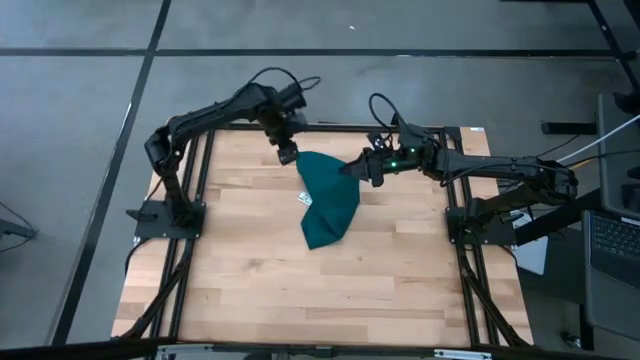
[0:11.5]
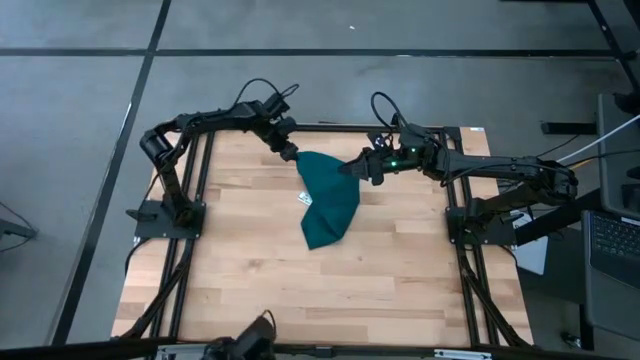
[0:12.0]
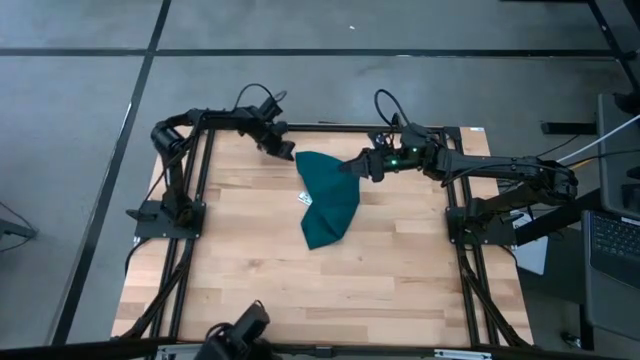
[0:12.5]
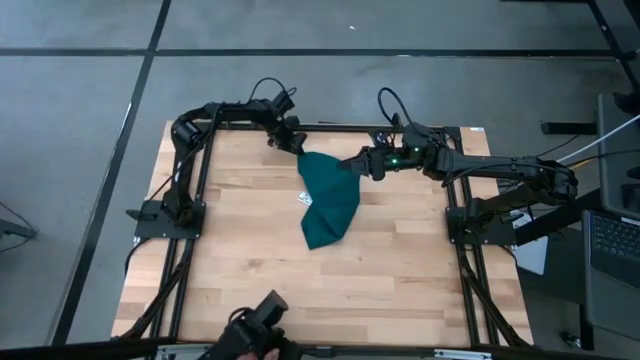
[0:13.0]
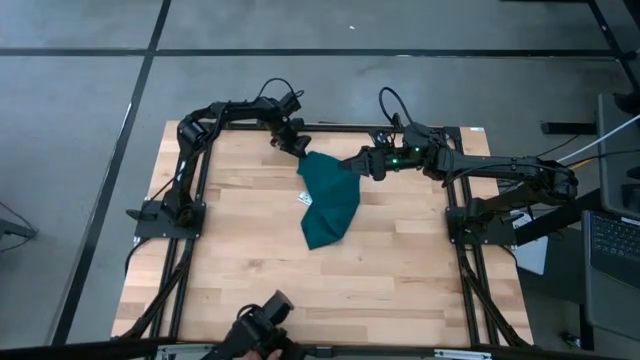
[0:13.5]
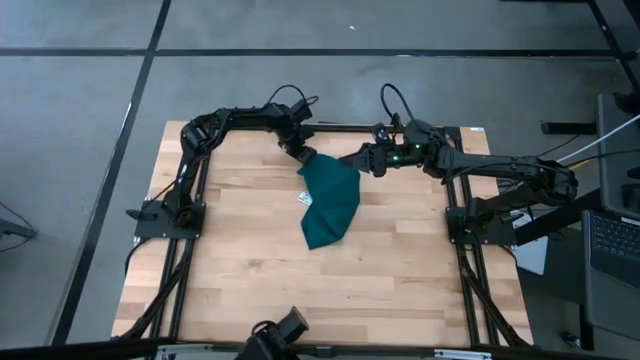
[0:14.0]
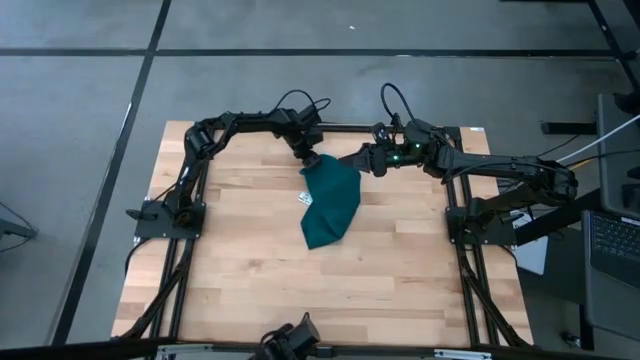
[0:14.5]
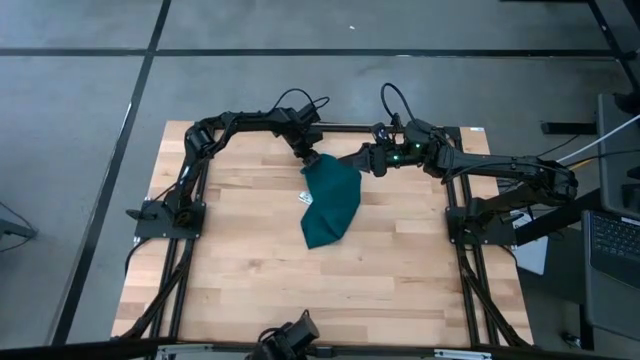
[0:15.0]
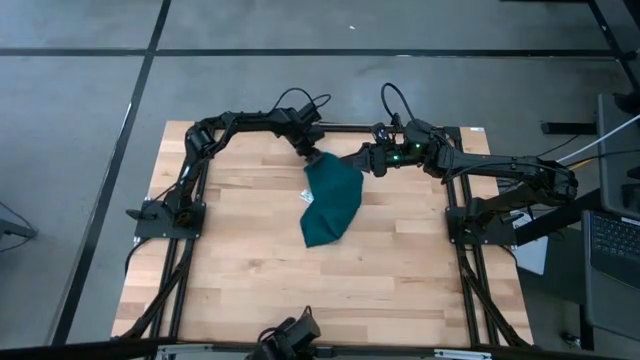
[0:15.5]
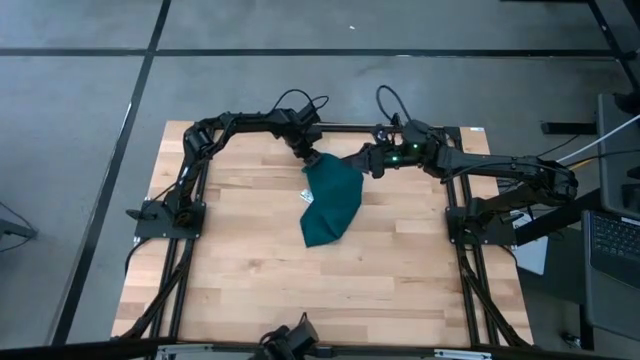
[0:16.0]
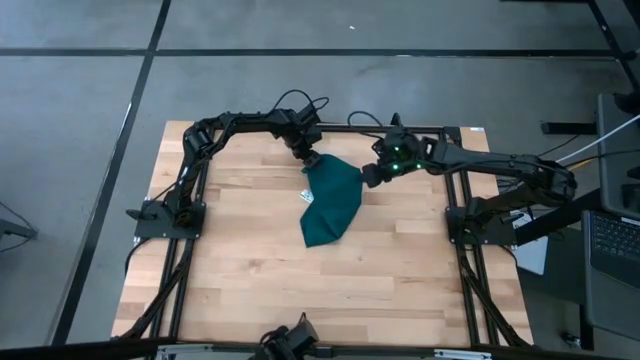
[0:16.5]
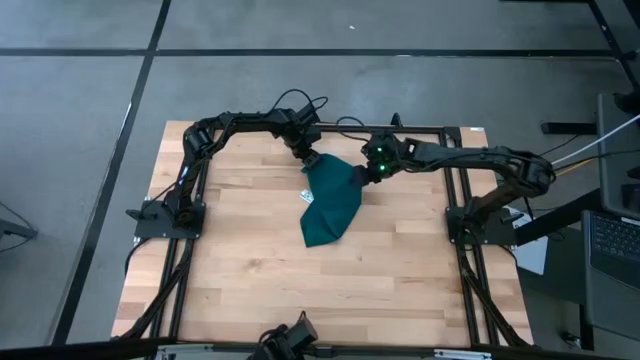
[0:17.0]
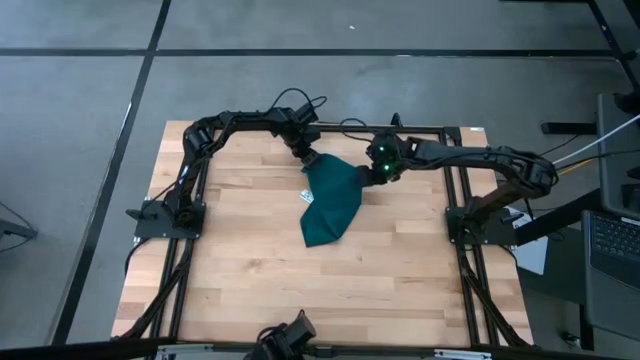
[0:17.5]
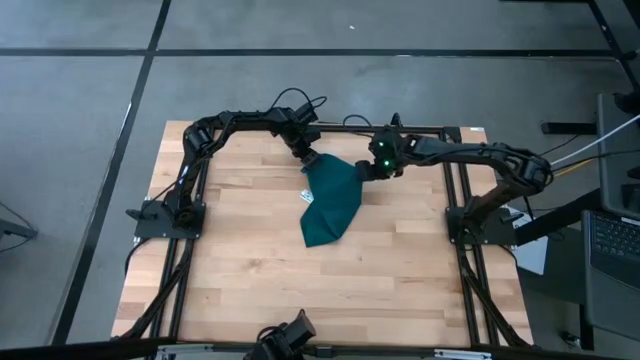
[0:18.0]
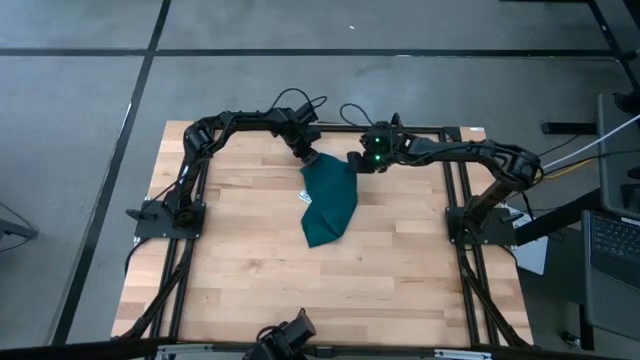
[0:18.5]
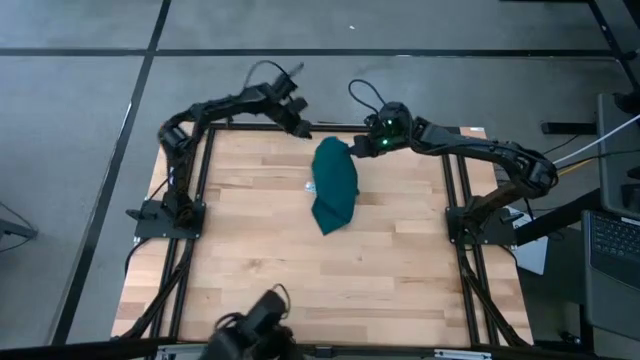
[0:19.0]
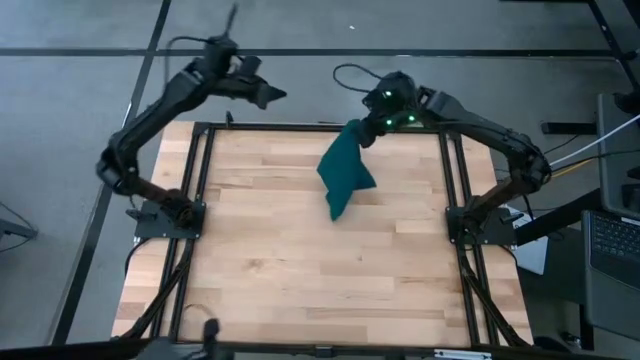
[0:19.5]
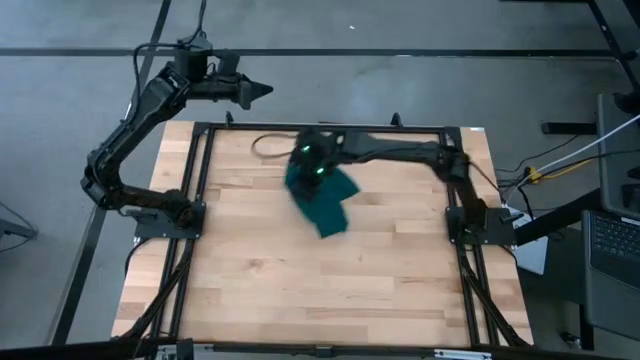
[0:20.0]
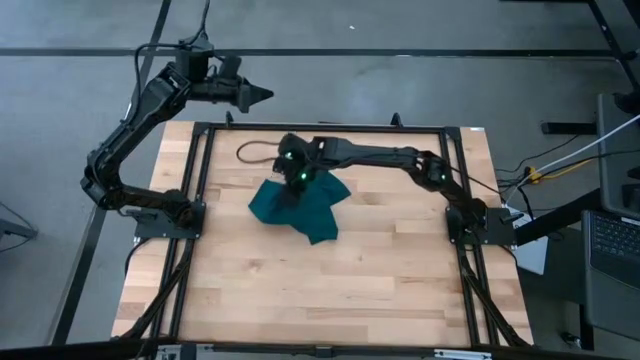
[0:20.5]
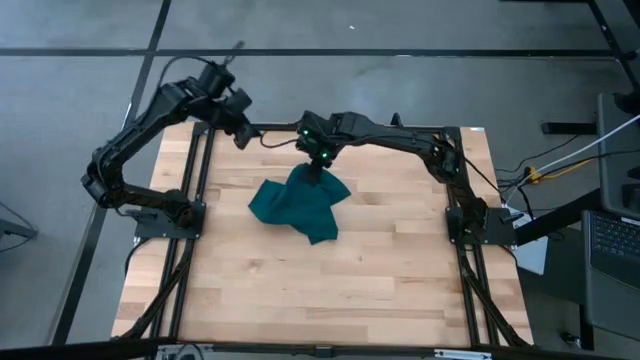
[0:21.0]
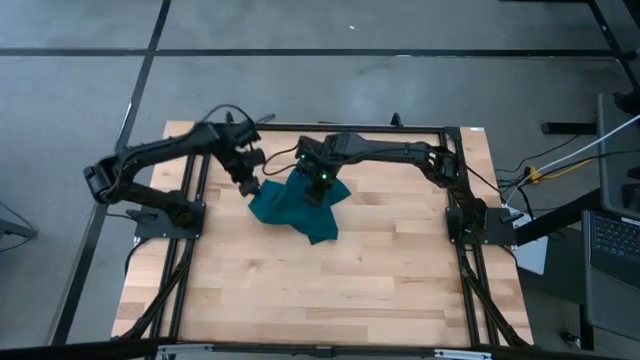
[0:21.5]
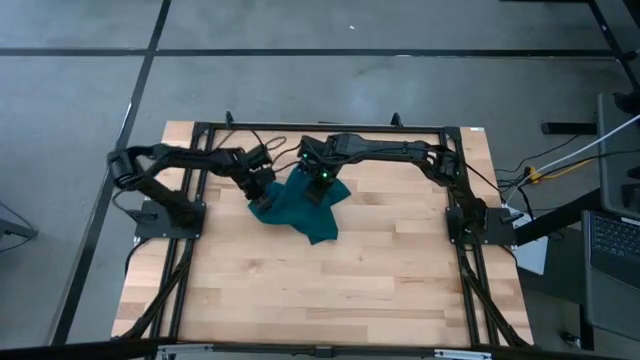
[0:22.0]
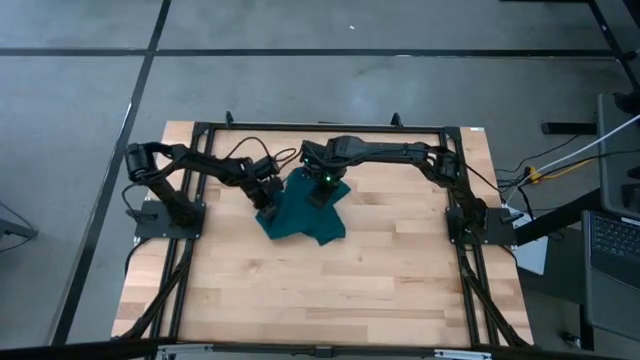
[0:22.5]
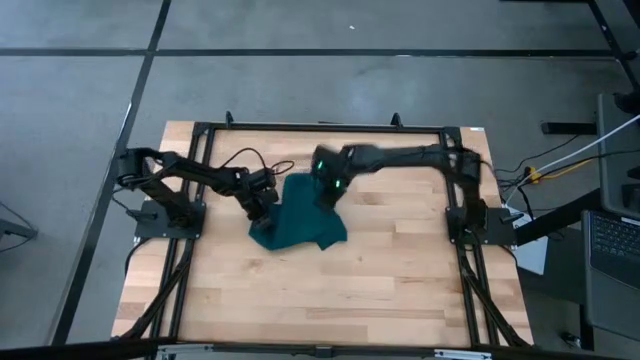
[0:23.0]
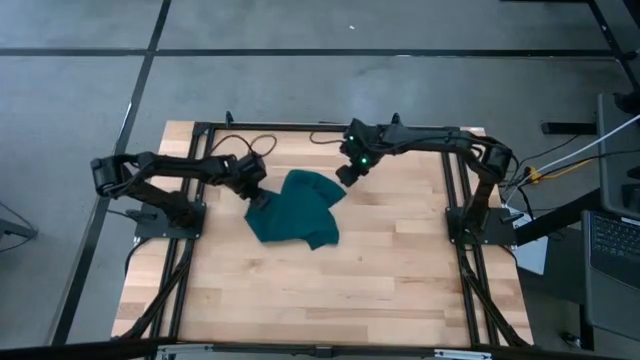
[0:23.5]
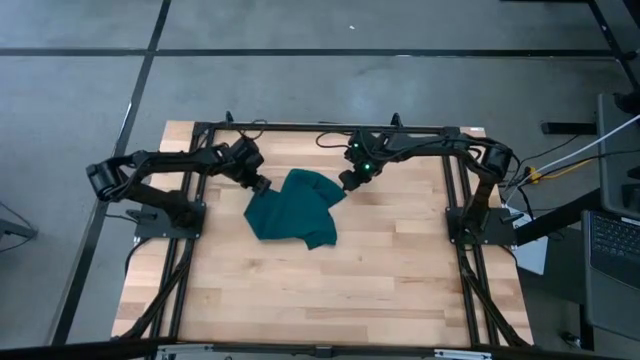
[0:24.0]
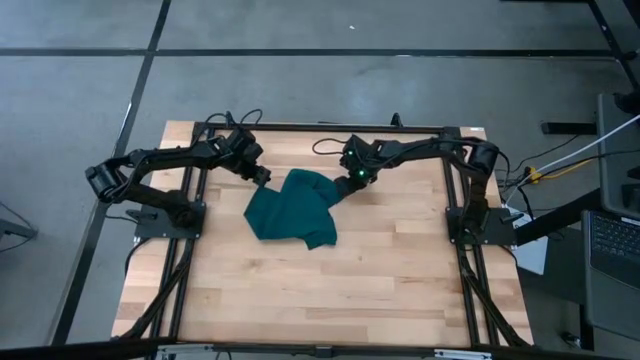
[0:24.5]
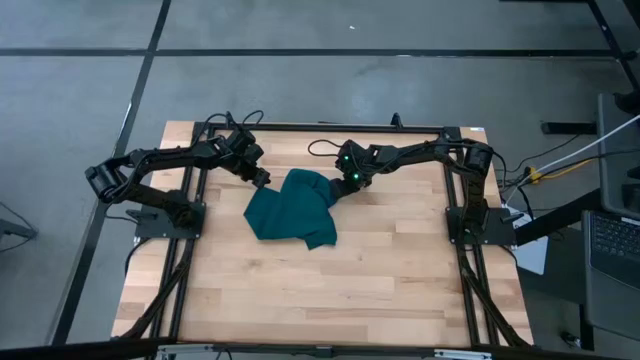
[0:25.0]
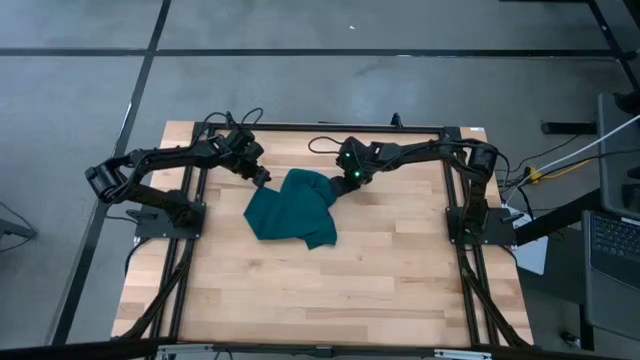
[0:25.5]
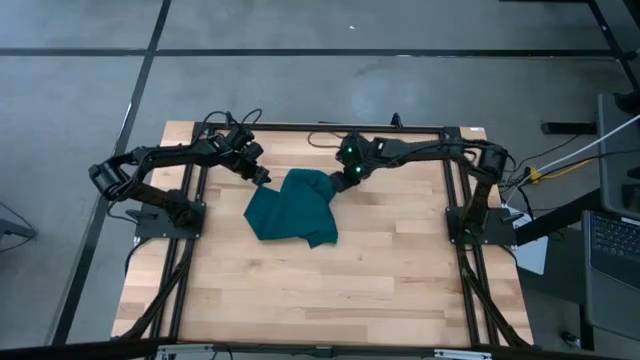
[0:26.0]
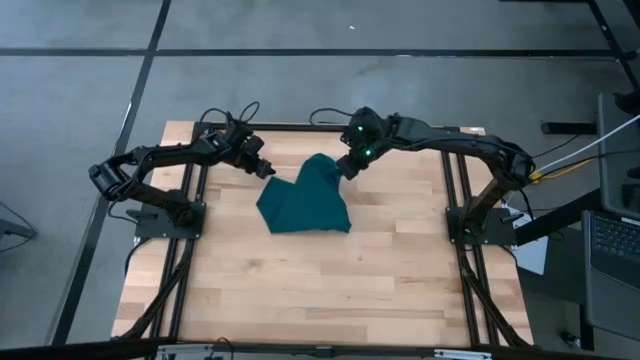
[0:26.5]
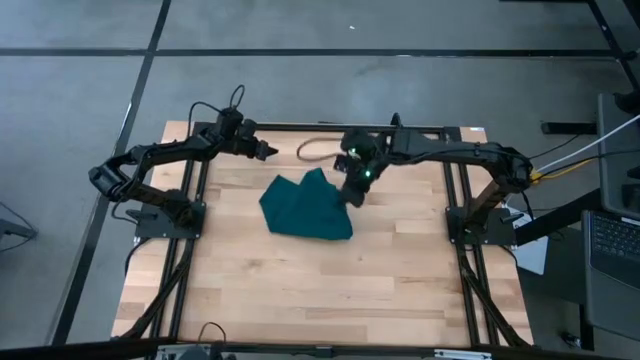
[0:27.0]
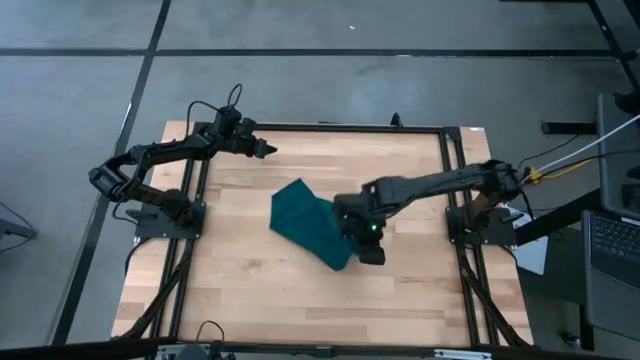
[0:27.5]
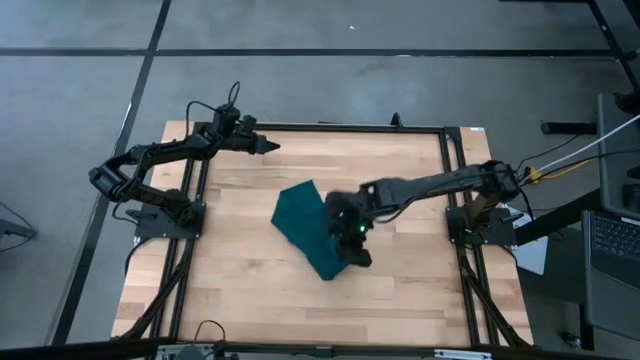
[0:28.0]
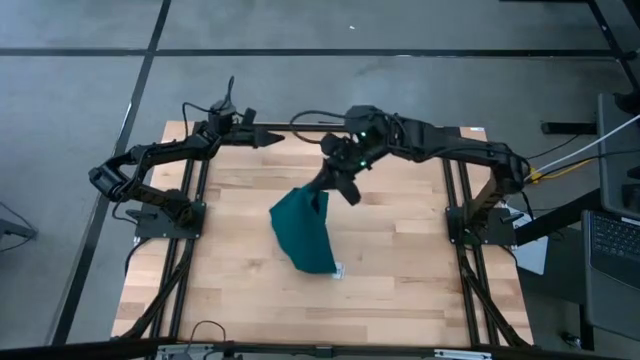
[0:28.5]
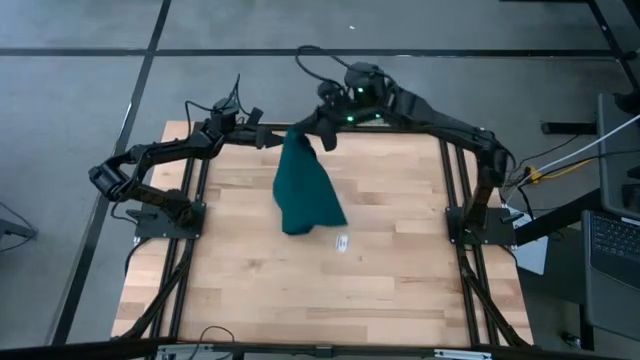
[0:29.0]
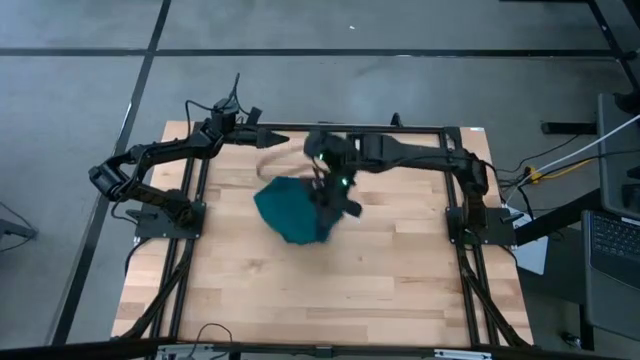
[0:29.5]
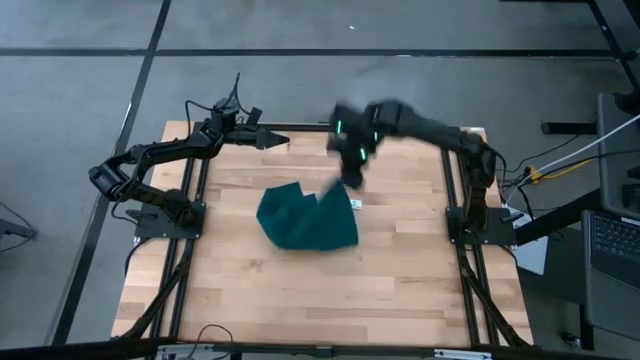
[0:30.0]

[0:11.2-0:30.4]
Task: Fold microfiber towels
Fold the dark green napkin
